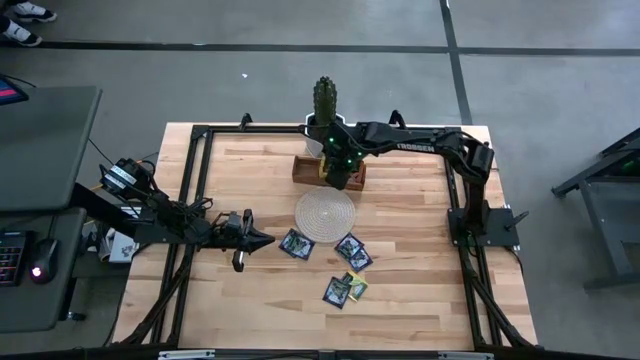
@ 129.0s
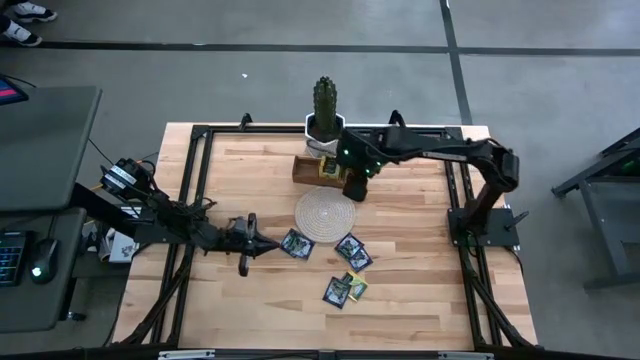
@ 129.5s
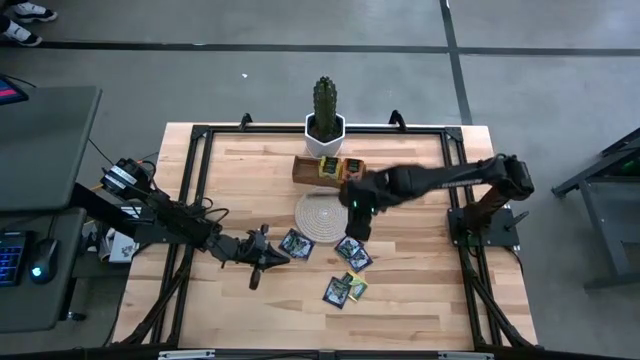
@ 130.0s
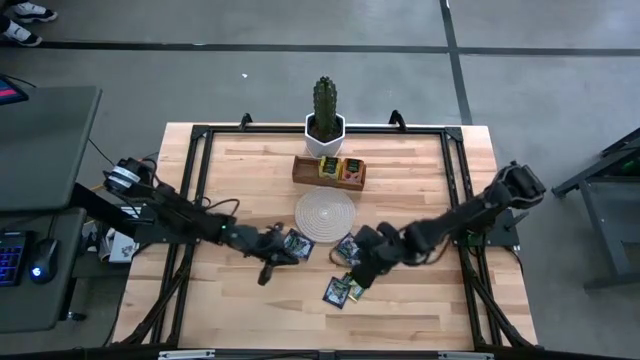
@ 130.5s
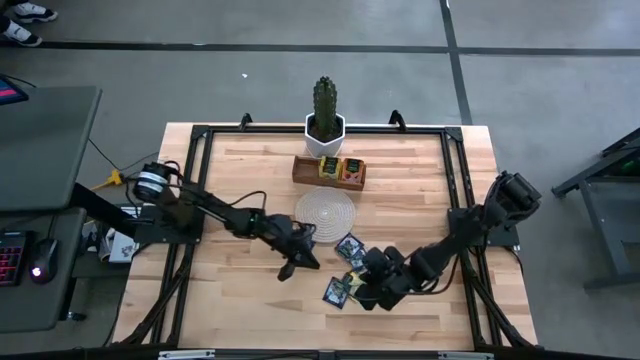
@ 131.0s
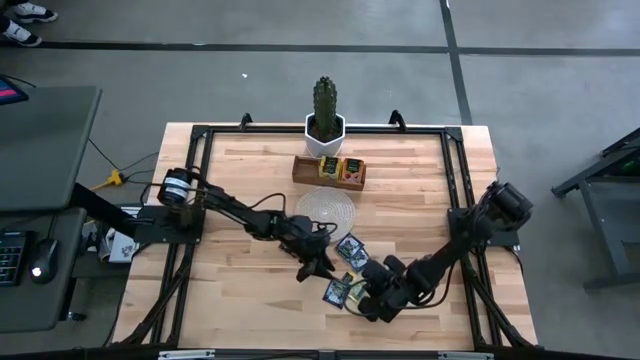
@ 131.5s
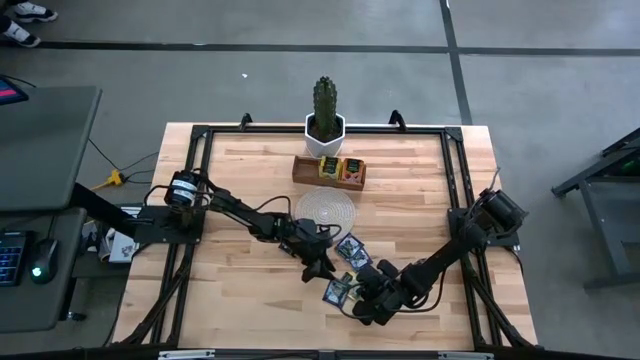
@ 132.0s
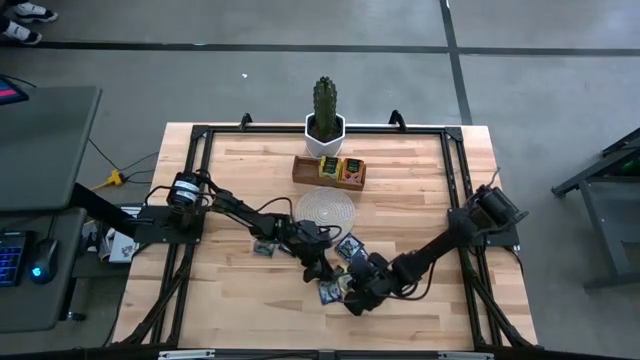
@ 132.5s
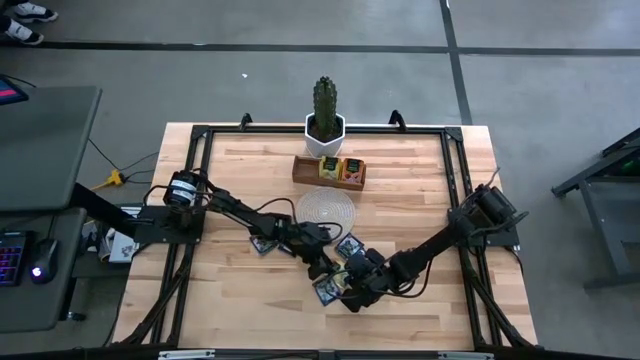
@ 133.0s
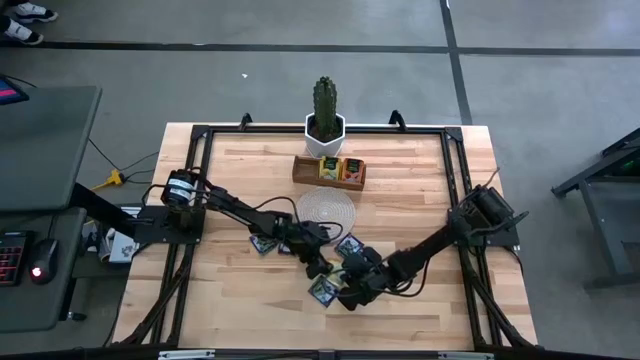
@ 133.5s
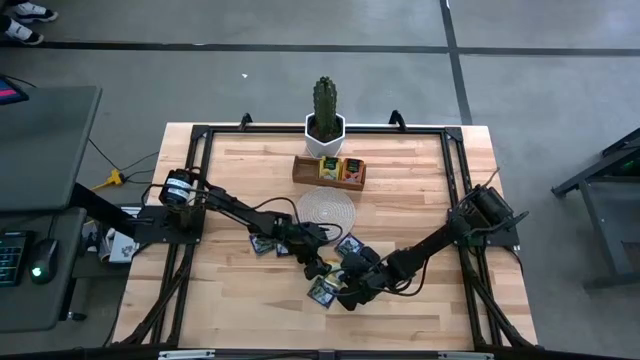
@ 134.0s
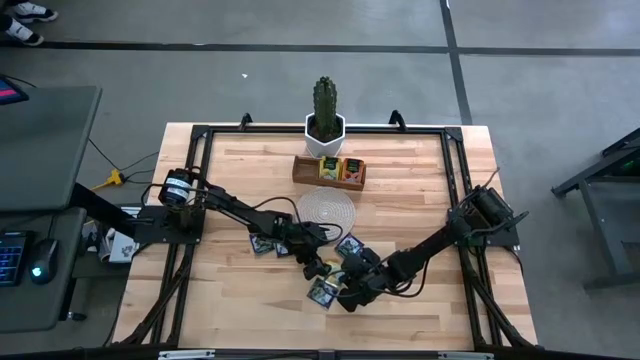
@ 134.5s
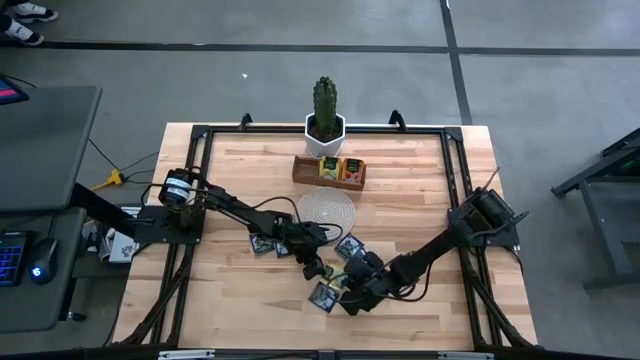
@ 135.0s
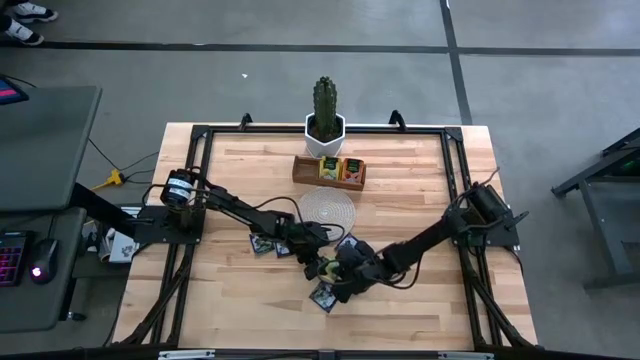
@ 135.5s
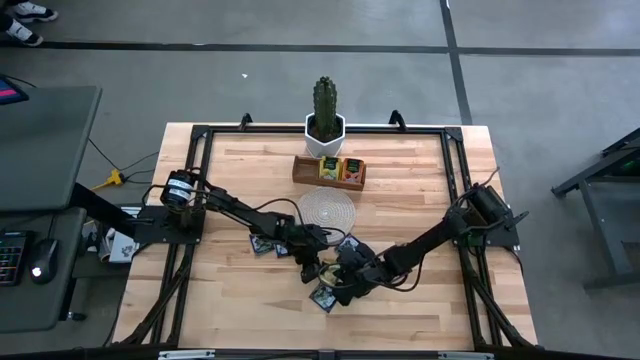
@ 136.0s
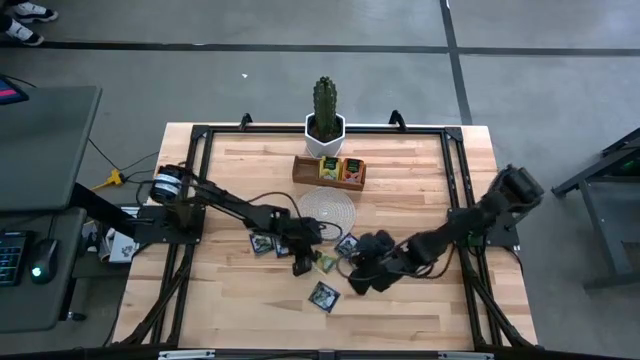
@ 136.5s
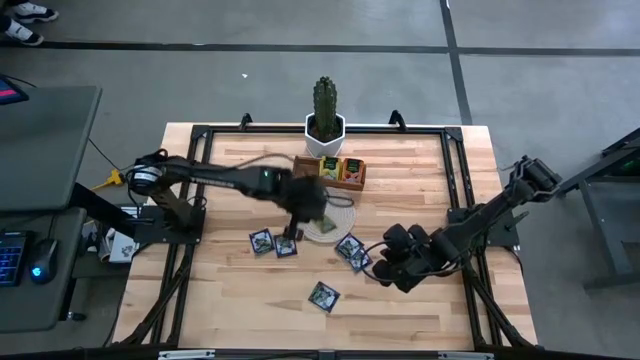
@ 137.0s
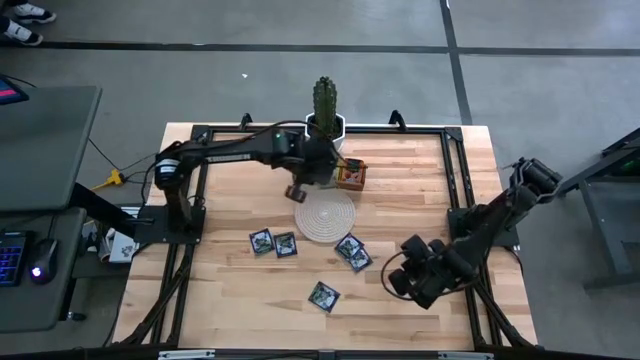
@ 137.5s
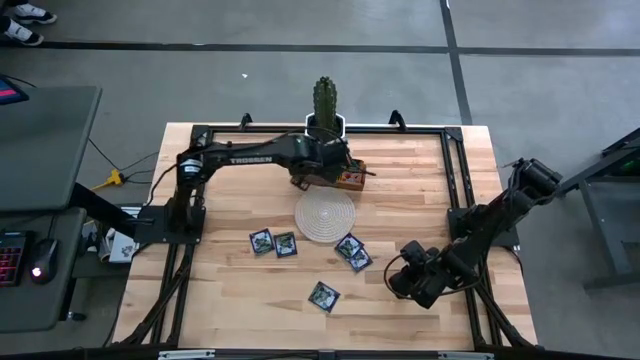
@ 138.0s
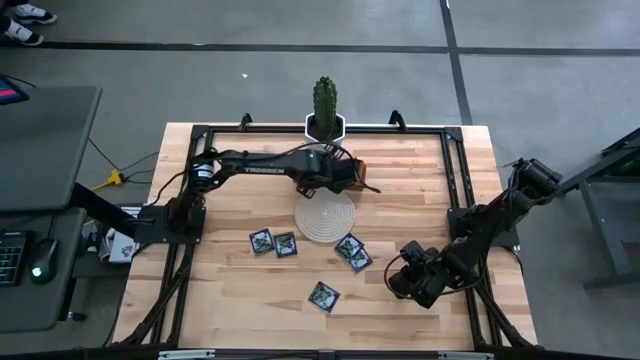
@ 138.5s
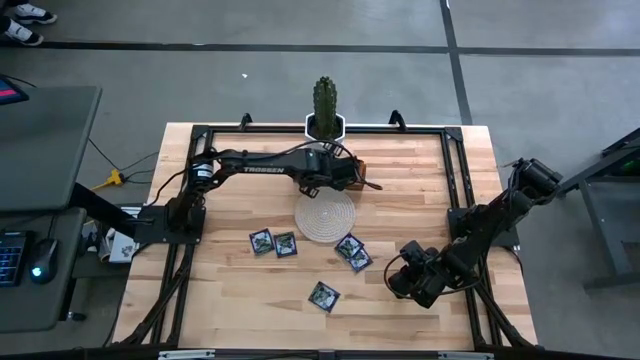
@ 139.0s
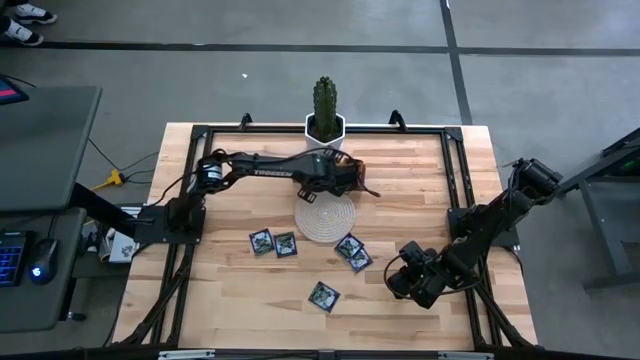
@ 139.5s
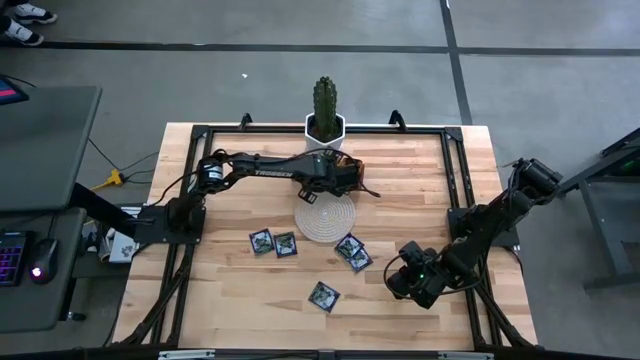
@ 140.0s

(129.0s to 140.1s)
Task: Pick & Place Tea
Put the yellow tea bag into the middle compartment of the wooden organizer

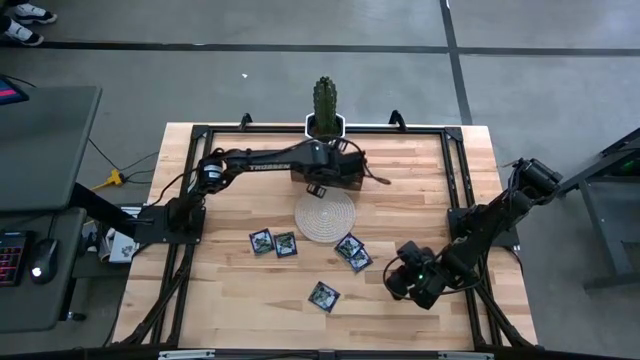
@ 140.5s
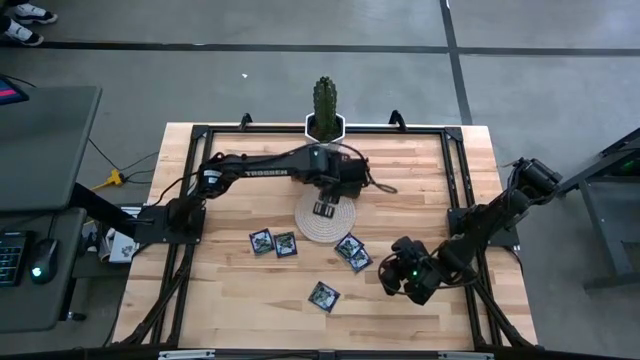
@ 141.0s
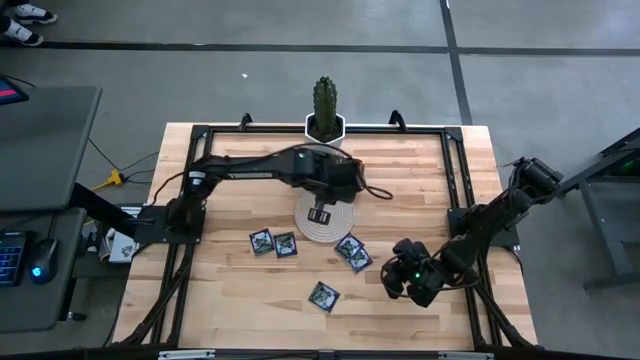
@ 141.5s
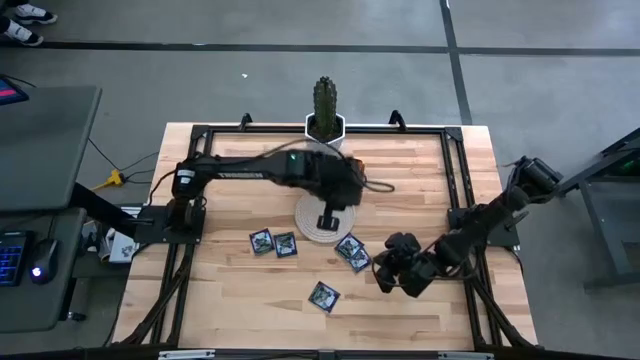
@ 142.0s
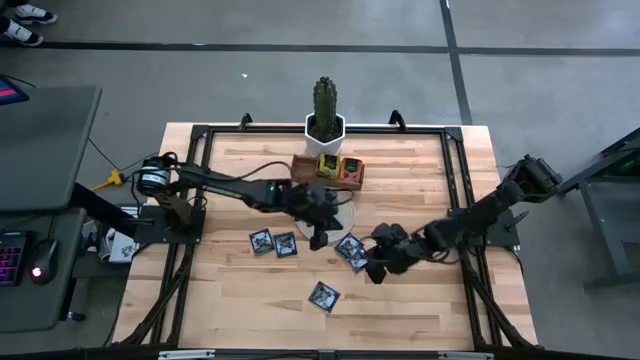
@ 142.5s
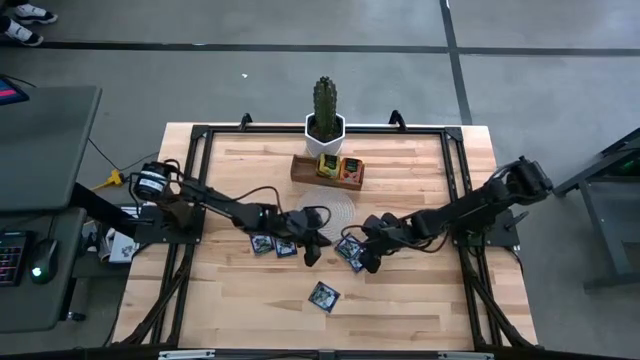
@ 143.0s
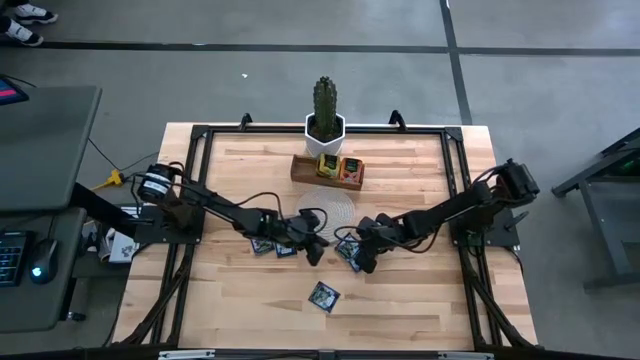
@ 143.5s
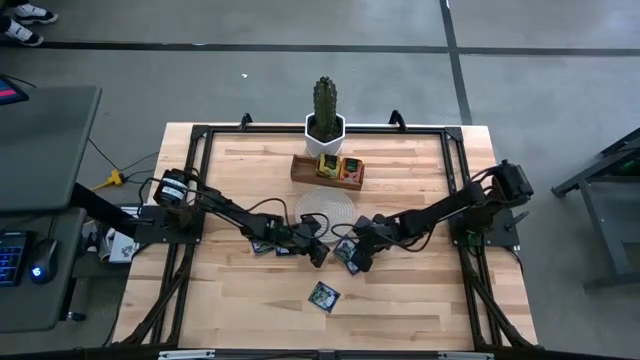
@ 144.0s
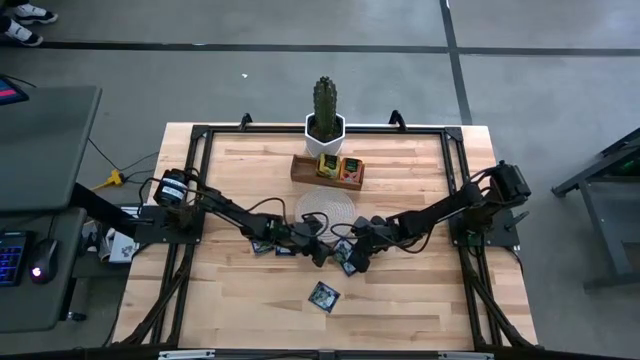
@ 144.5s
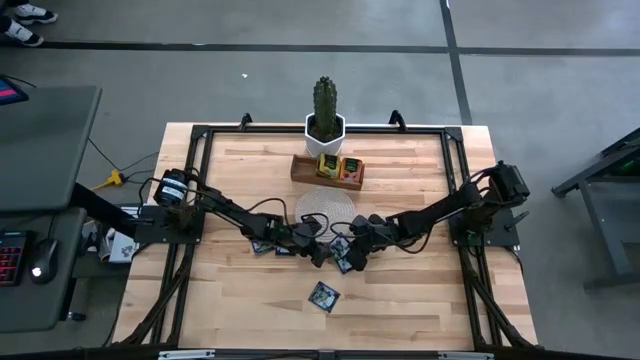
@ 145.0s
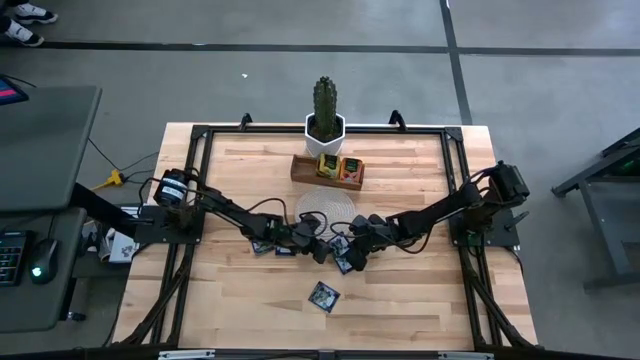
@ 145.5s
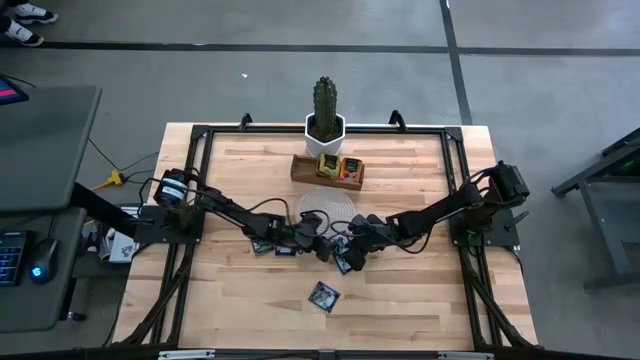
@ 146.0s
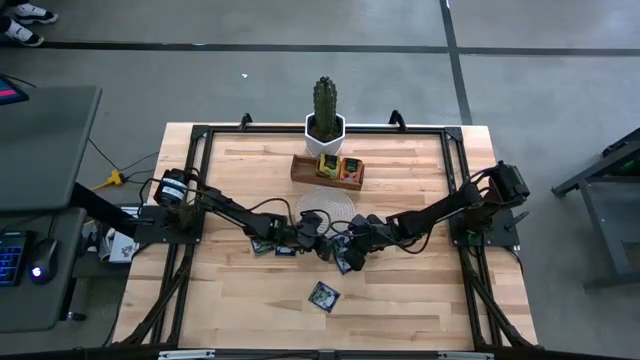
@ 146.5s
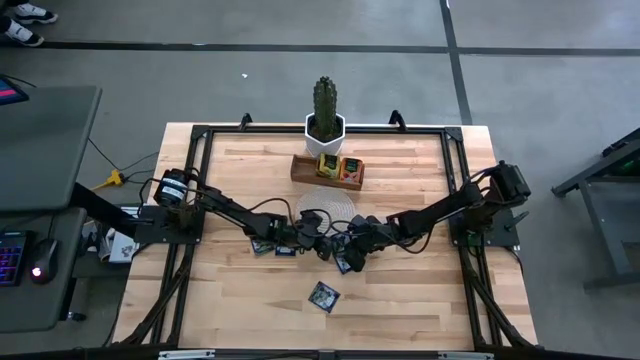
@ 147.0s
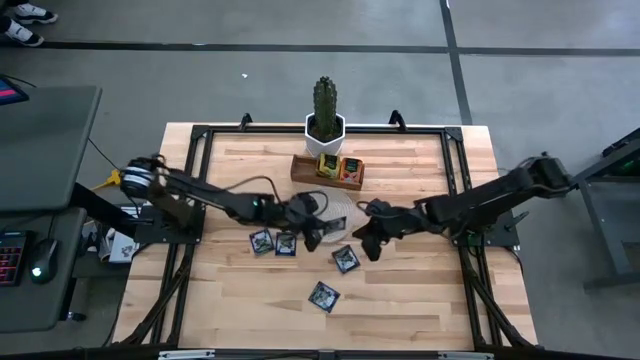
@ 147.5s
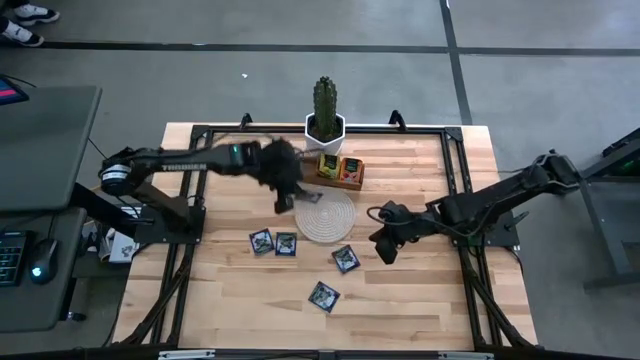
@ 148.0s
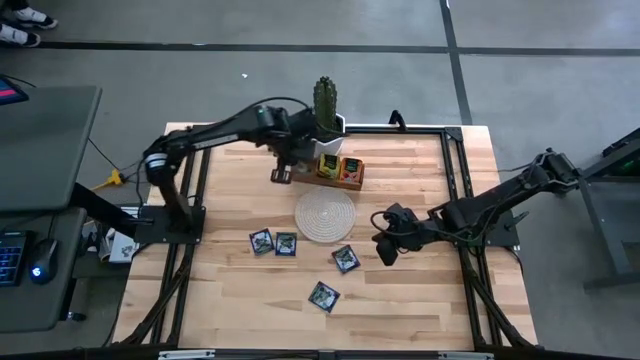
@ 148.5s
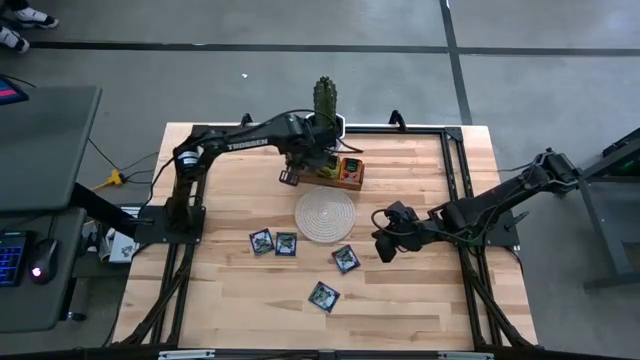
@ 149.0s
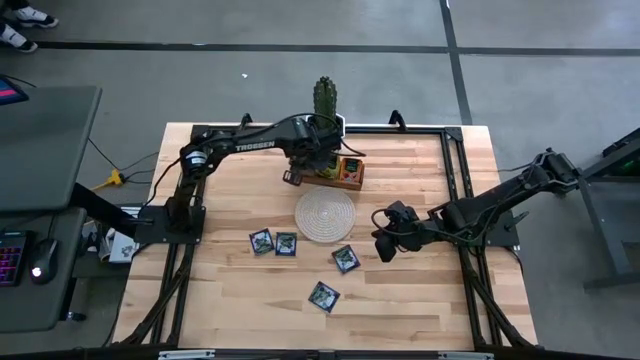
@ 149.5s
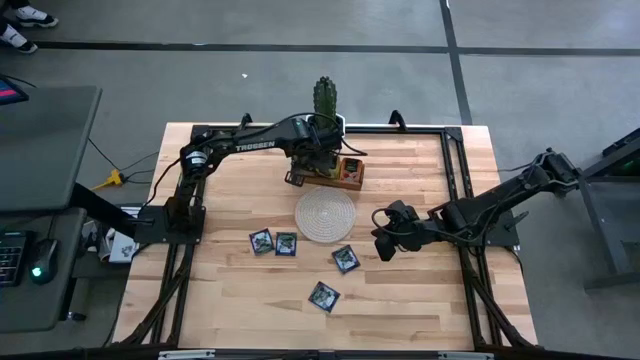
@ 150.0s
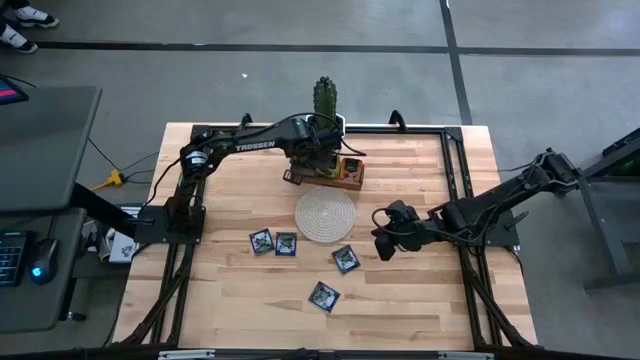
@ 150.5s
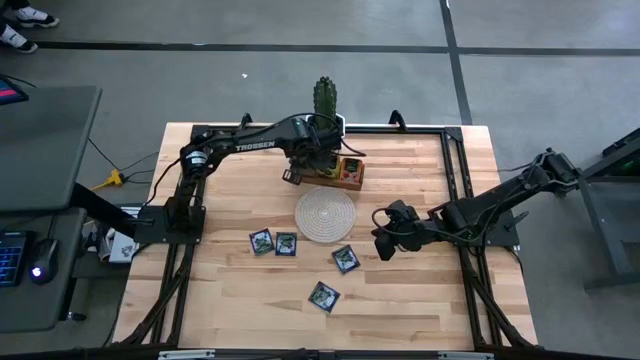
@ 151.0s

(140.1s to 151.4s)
Put the purple tea bag into the left section of the wooden organizer
